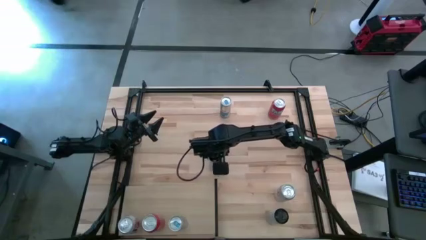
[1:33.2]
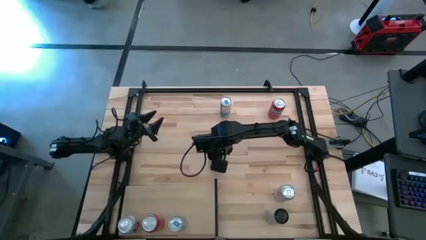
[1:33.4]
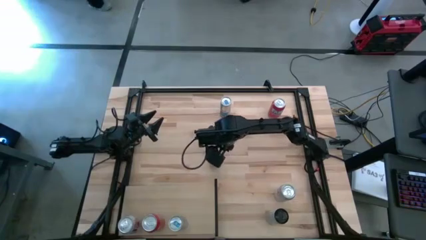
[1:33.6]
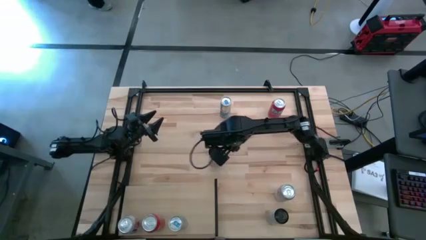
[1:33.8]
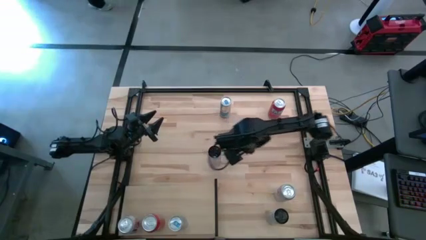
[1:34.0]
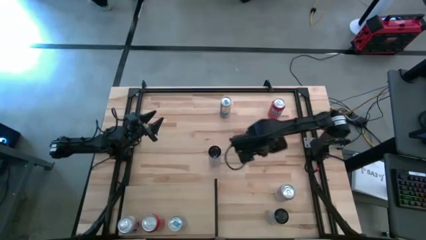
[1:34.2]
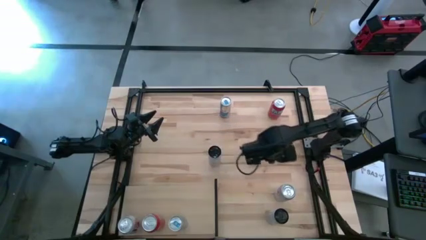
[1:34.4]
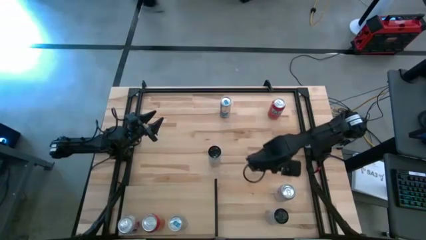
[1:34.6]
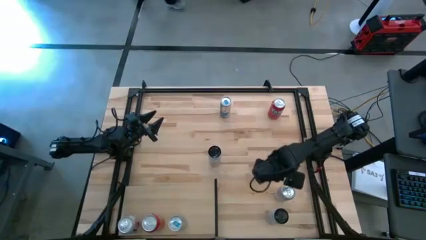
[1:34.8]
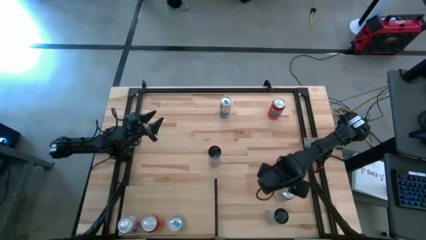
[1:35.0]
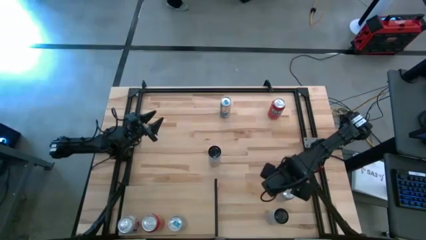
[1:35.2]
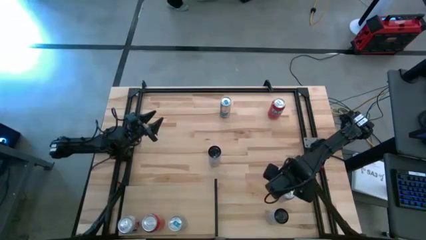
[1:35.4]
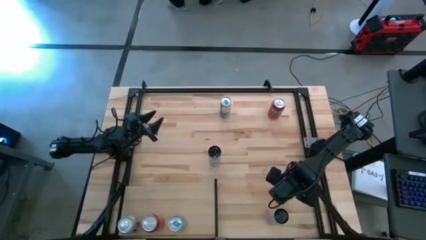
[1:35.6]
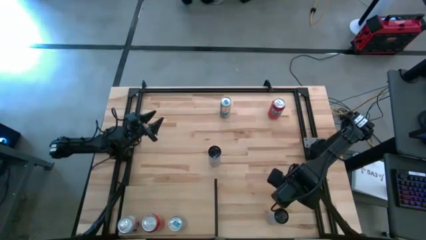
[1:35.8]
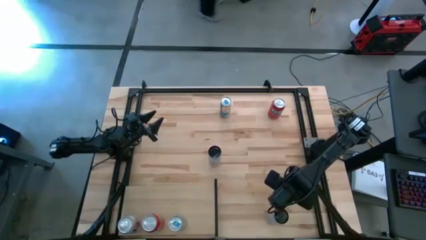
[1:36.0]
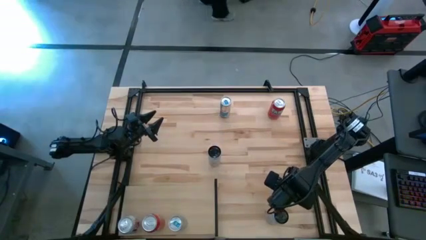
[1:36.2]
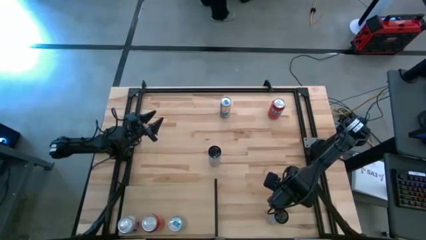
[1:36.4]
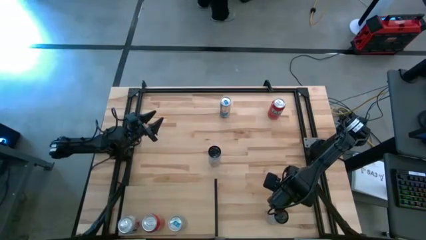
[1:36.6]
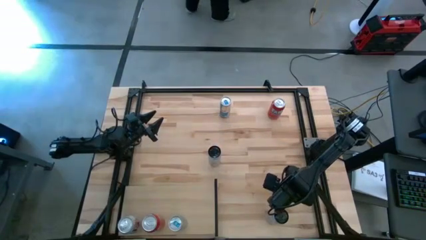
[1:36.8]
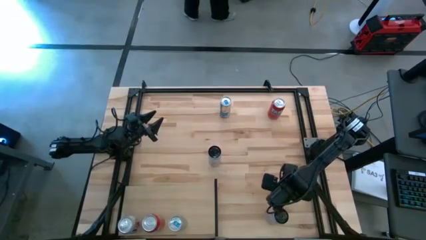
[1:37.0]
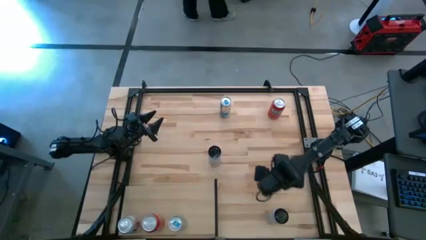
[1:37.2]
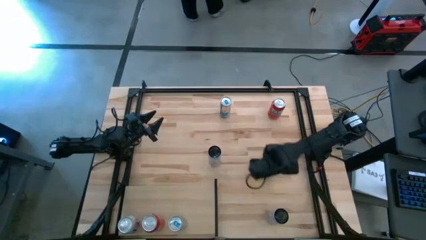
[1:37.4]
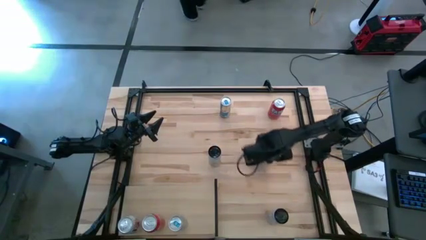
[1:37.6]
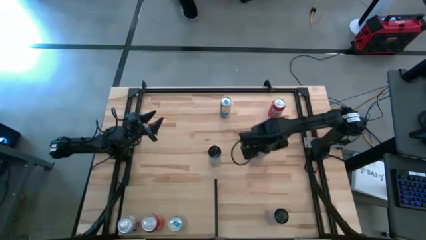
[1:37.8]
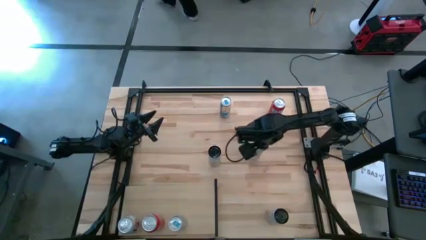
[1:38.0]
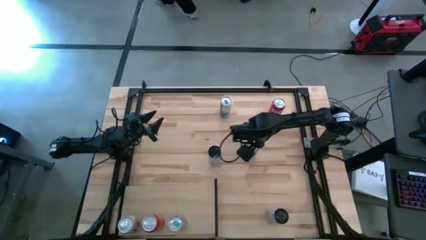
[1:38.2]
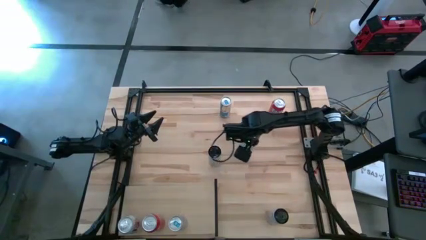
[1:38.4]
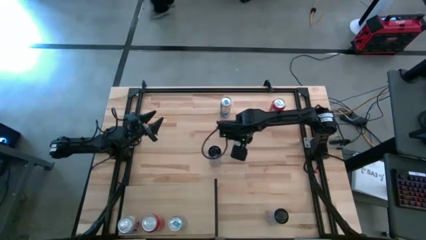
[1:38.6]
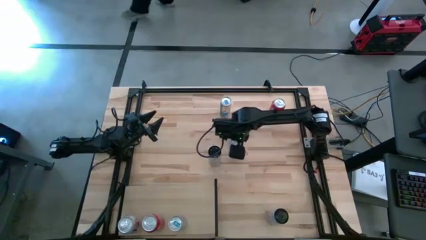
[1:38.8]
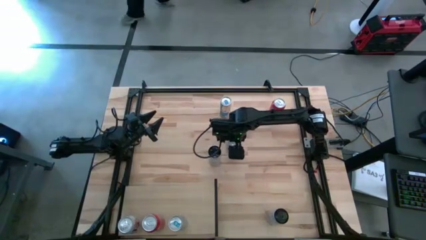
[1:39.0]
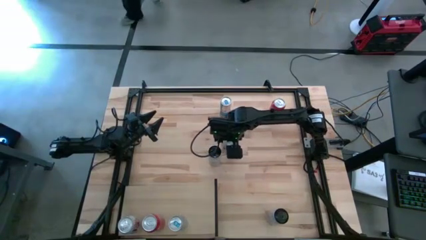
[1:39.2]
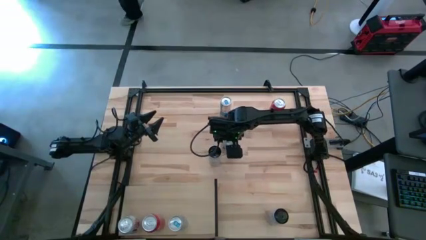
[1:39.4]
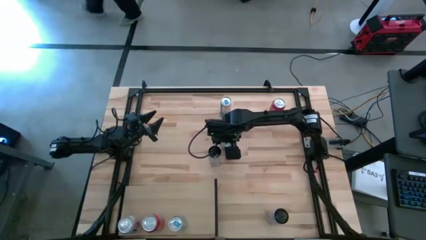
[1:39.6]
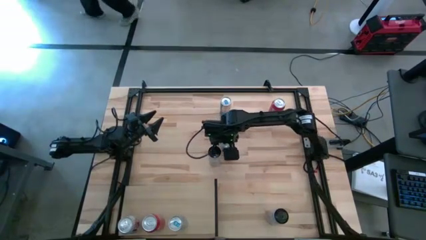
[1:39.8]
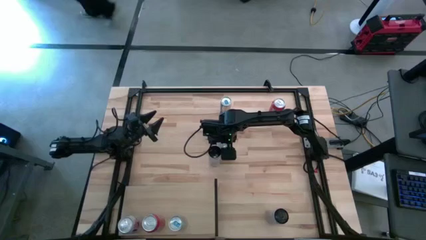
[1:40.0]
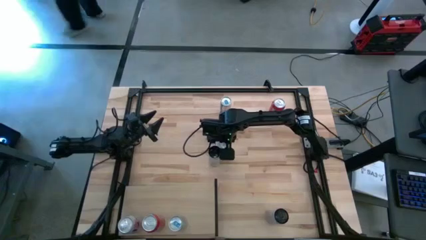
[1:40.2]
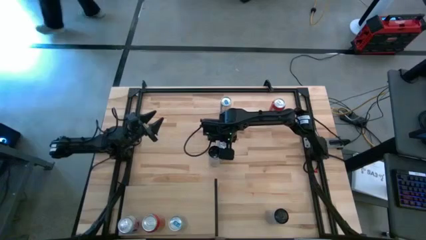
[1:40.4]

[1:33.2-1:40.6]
Task: Place canned beverage on shelf
Move the red silver soda can to the center of the table

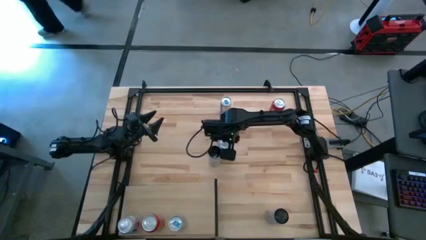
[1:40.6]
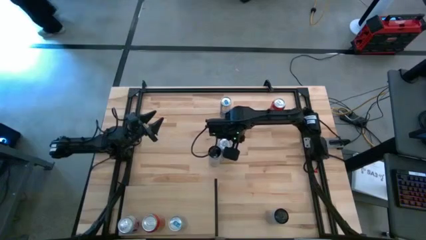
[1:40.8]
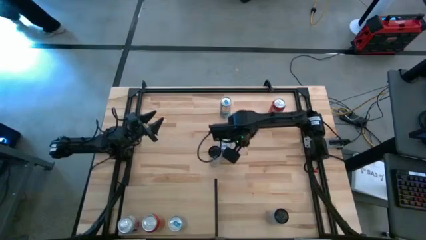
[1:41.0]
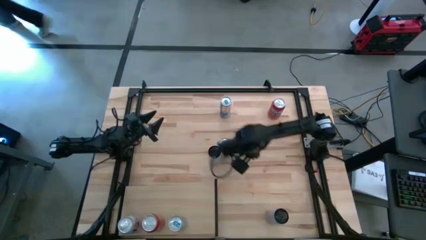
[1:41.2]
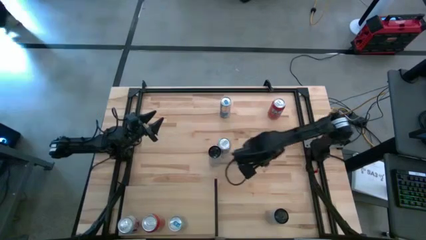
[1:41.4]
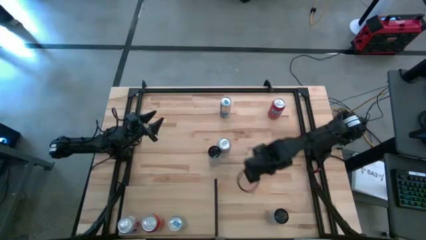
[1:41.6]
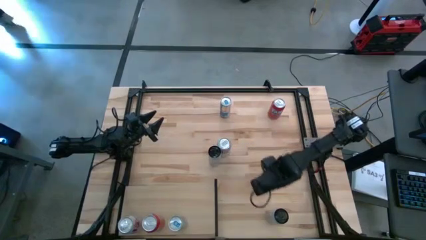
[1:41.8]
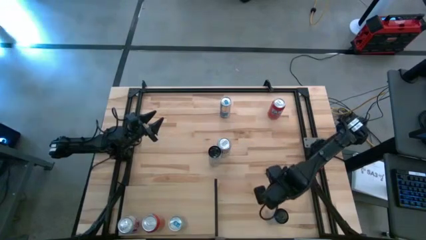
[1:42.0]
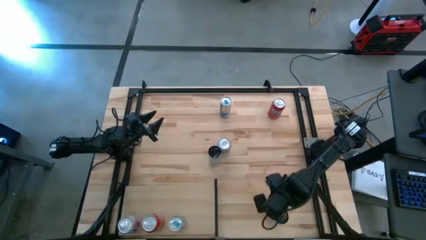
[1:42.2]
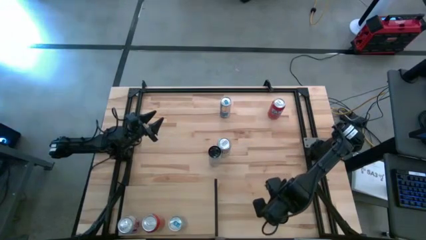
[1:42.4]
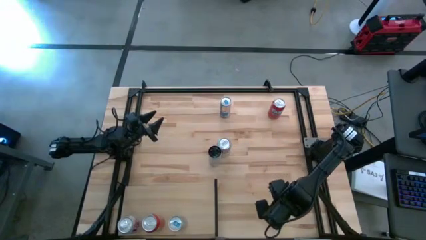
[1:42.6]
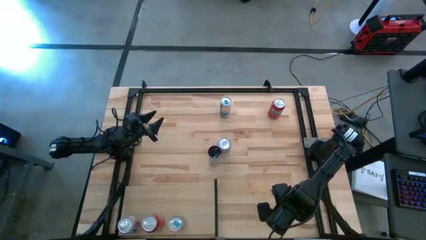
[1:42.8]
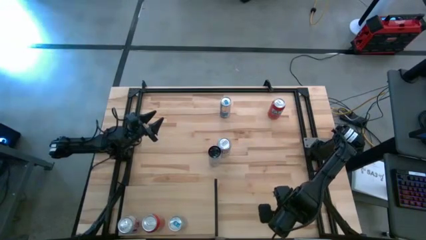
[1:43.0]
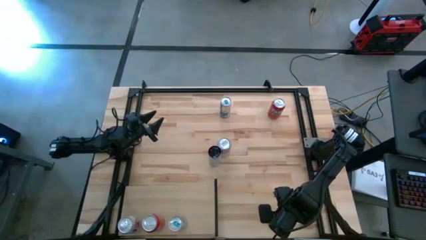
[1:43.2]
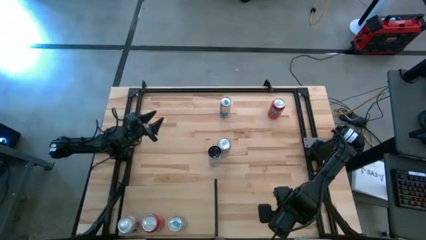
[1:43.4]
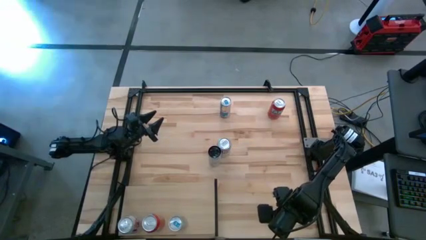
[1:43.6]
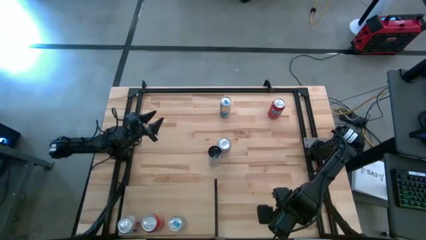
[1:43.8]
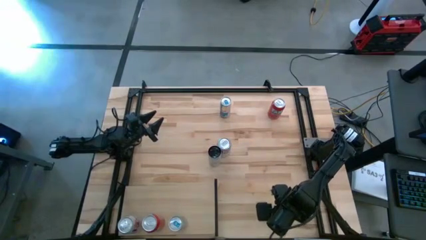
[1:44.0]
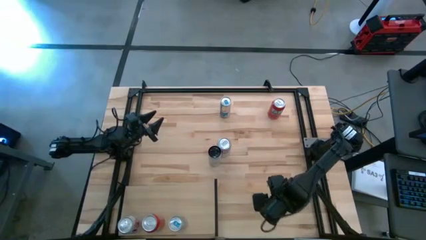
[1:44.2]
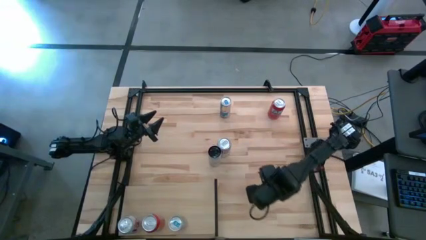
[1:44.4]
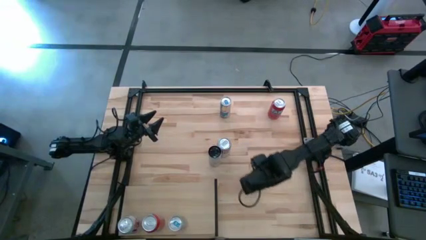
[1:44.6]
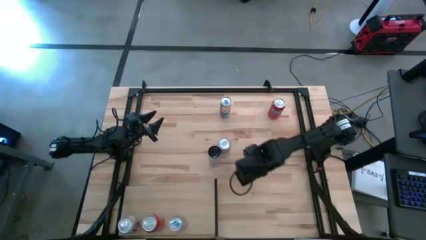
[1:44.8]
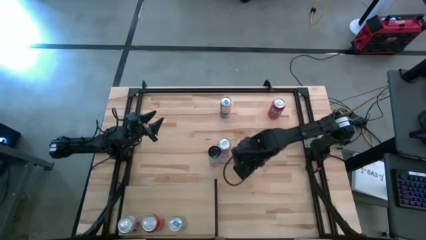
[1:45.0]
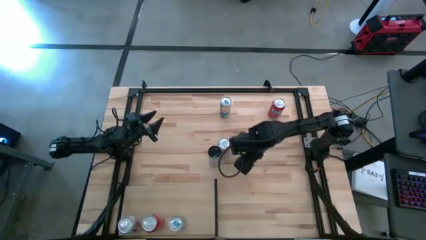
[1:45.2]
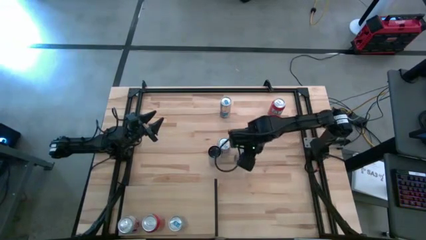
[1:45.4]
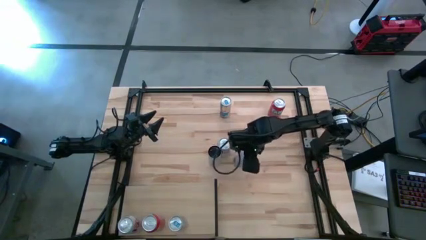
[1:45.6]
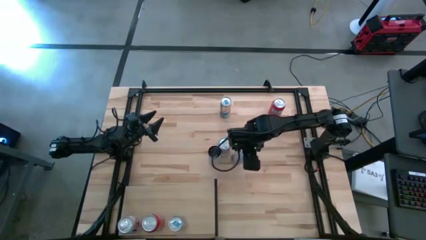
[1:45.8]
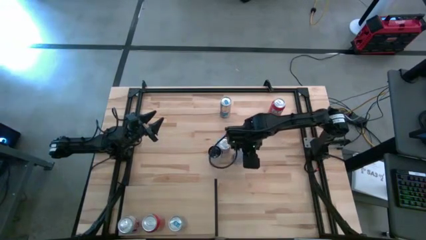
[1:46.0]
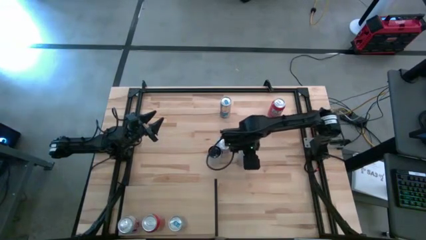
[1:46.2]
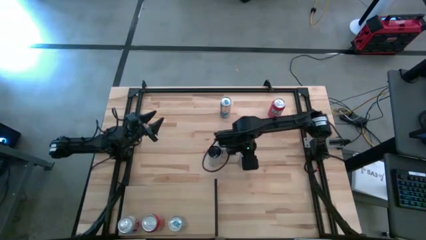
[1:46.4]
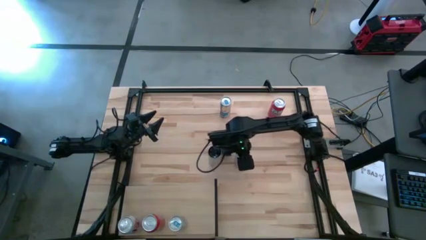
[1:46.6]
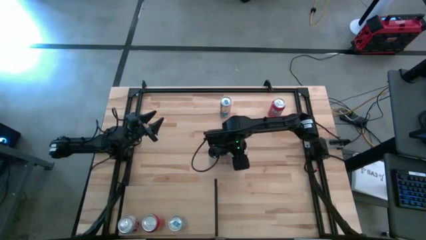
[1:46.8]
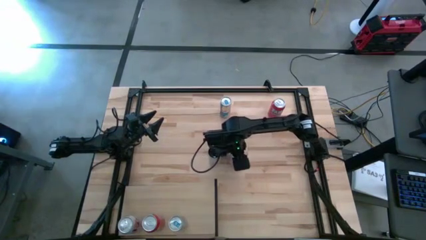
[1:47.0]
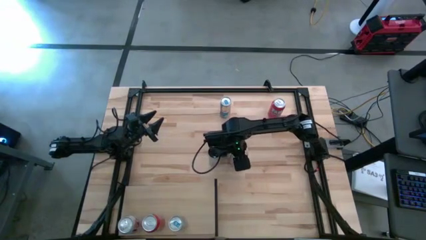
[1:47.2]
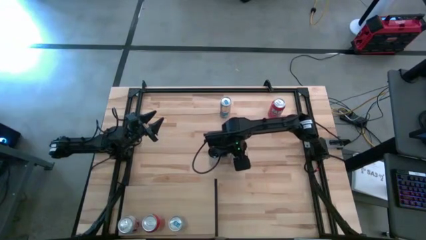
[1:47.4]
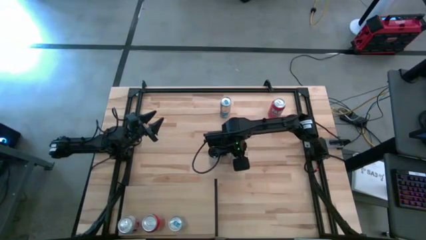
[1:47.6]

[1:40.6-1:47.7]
Move the bottom white pink soda can to the center of the table

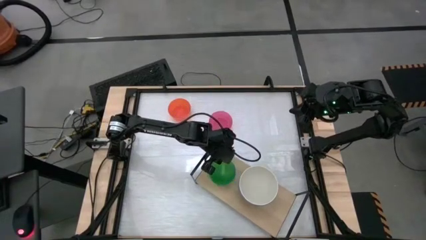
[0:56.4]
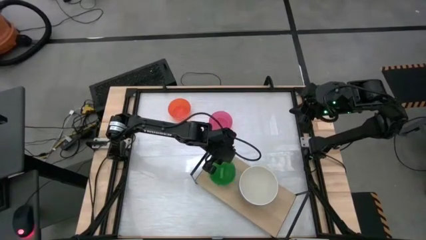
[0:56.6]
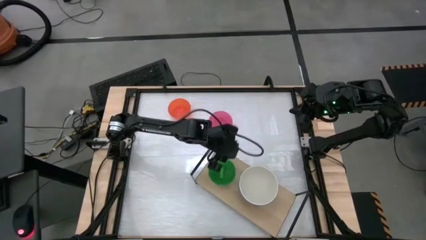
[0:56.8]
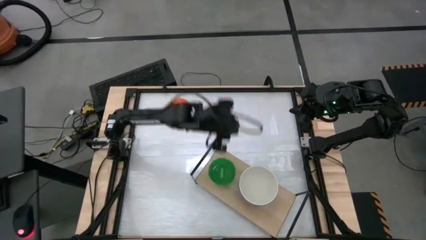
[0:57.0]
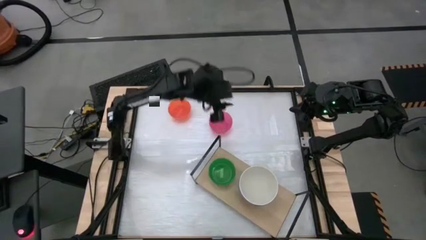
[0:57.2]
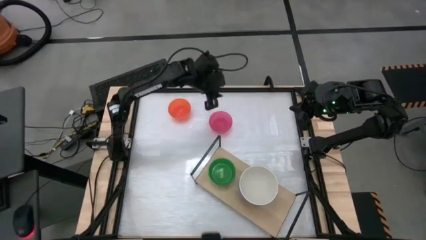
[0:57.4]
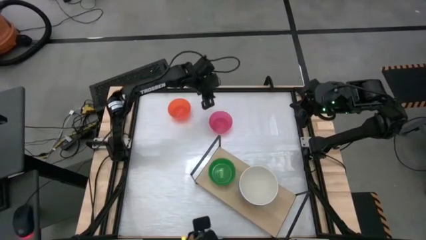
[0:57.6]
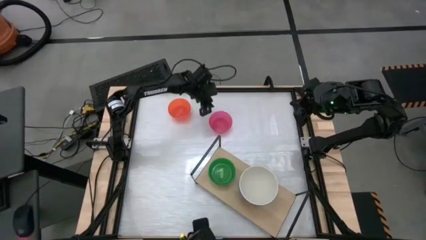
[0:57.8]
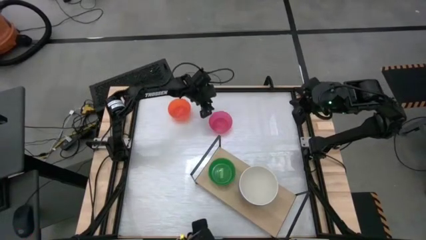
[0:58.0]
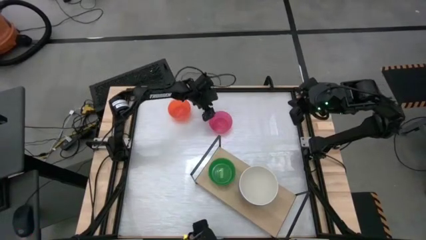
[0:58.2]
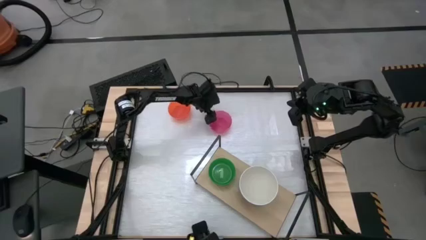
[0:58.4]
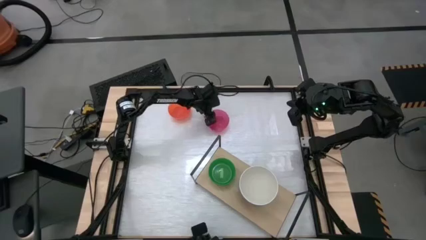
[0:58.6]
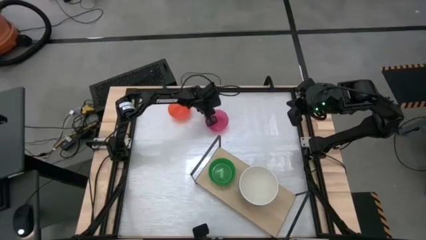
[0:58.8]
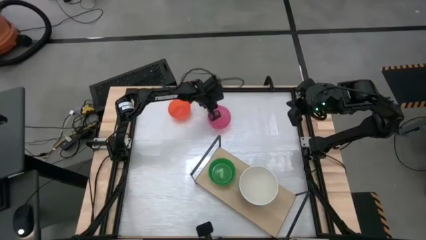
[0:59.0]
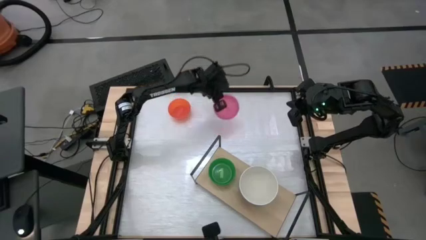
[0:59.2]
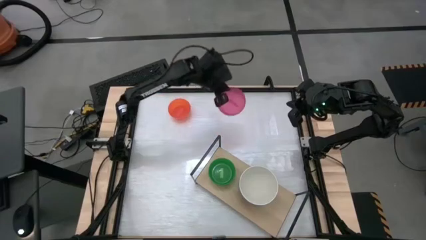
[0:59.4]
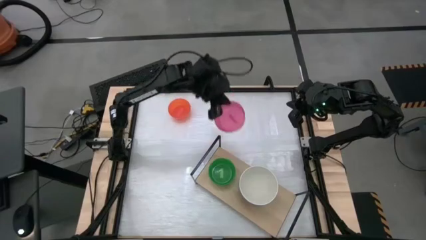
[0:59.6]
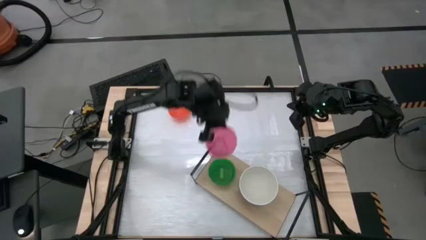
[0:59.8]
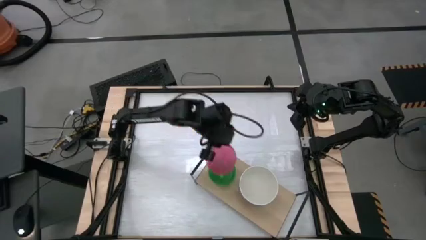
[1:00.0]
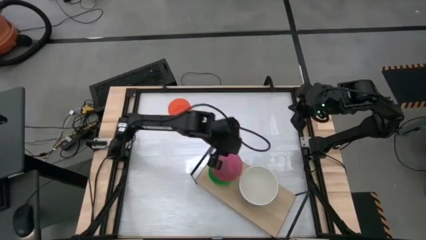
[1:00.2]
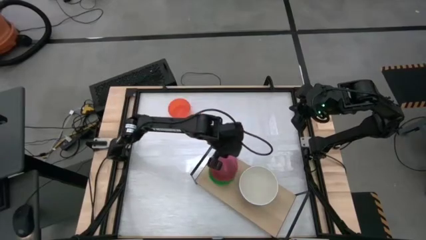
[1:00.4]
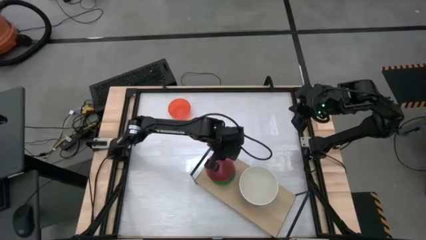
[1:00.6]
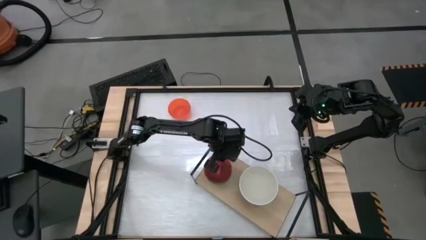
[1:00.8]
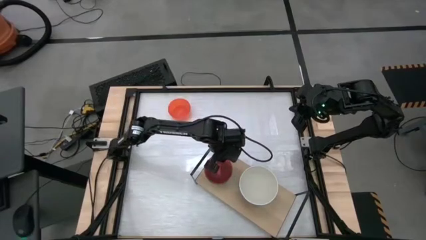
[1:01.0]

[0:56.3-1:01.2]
Task: Place and stack bowls onto a shelf
Stack the small pink bowl on the small green bowl on the shelf
